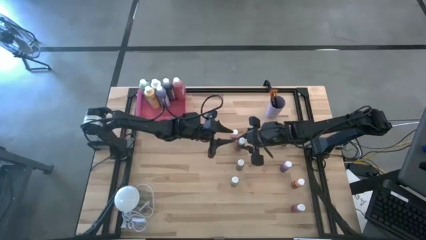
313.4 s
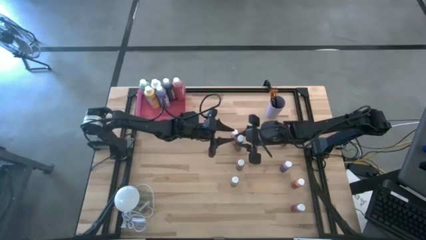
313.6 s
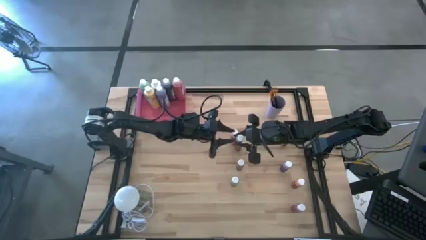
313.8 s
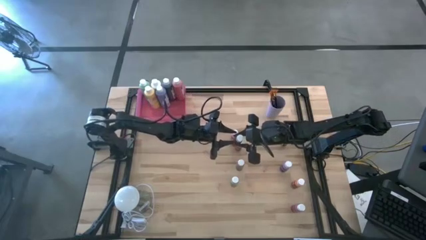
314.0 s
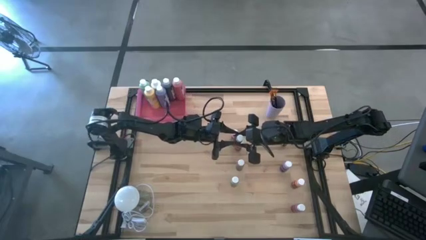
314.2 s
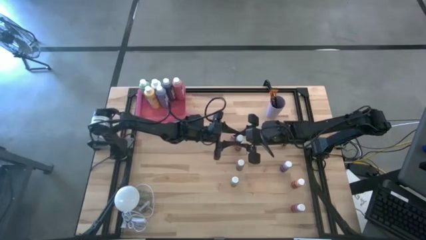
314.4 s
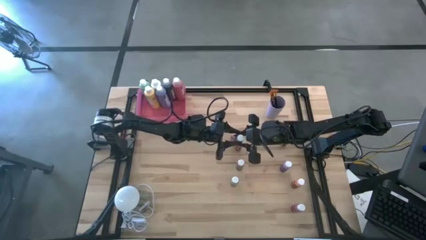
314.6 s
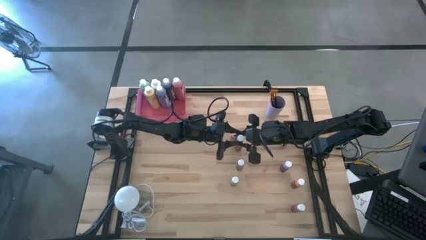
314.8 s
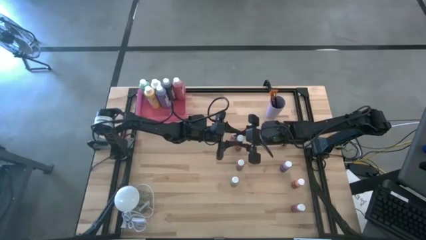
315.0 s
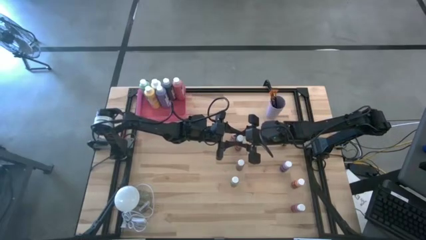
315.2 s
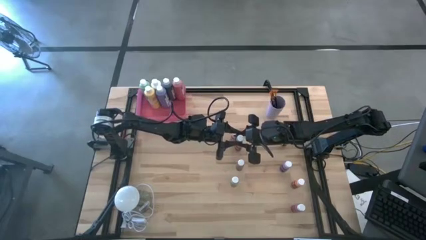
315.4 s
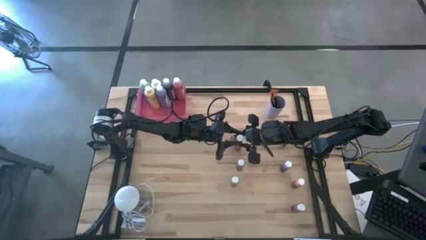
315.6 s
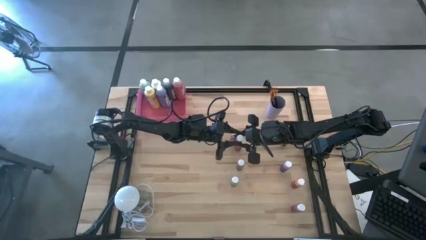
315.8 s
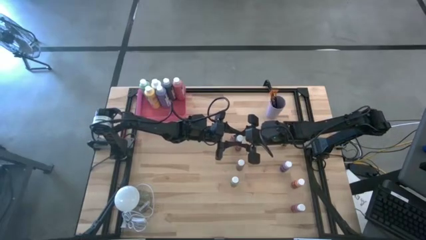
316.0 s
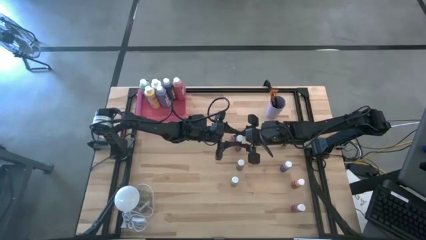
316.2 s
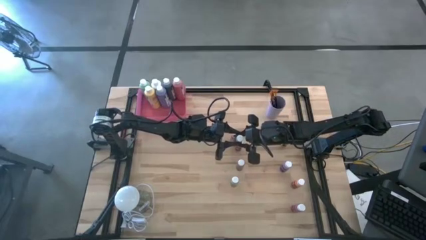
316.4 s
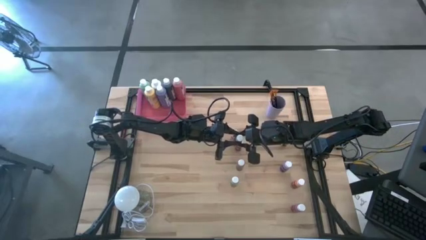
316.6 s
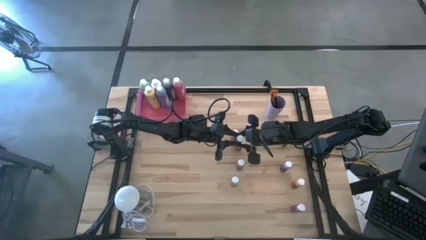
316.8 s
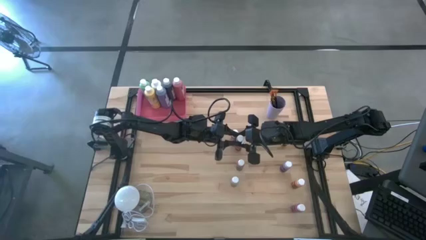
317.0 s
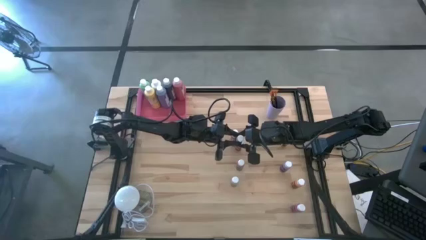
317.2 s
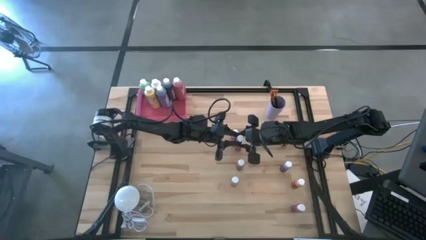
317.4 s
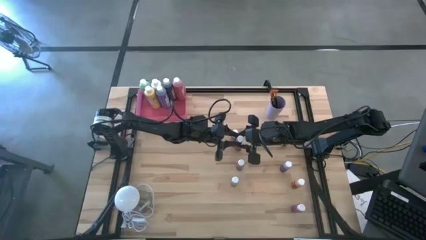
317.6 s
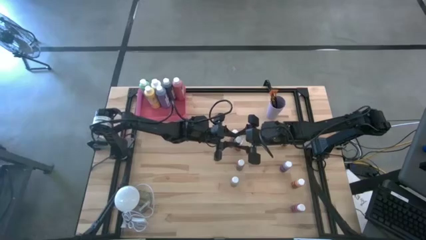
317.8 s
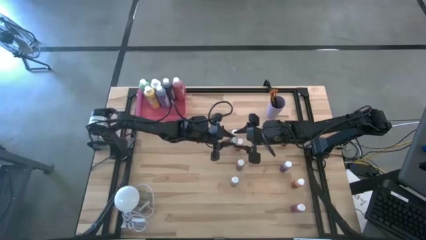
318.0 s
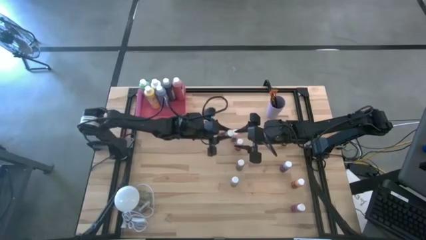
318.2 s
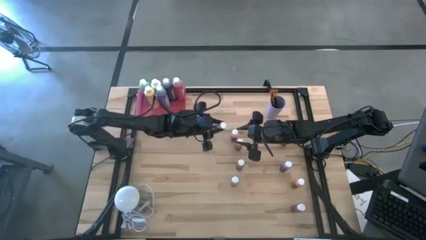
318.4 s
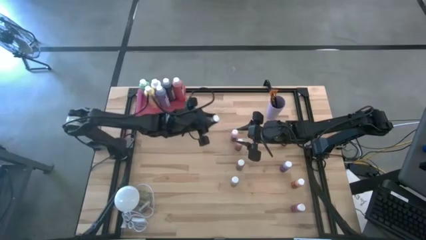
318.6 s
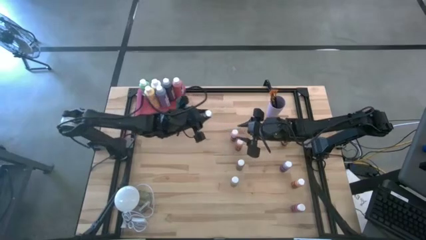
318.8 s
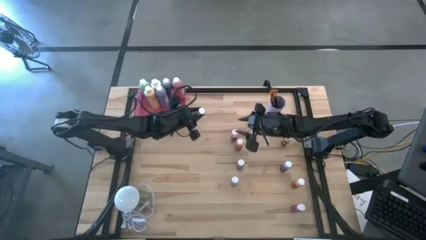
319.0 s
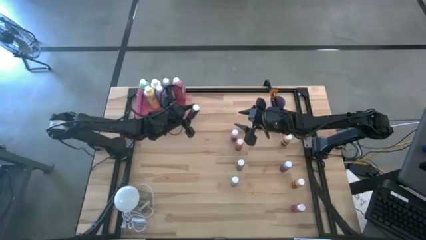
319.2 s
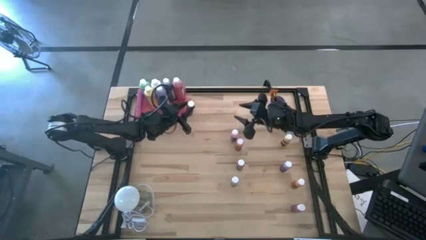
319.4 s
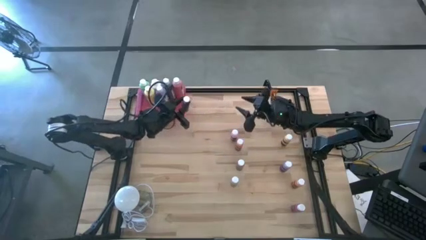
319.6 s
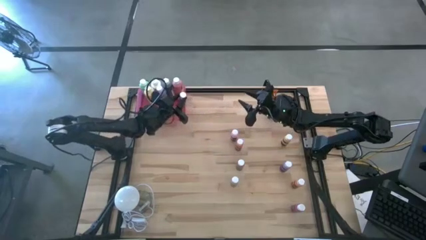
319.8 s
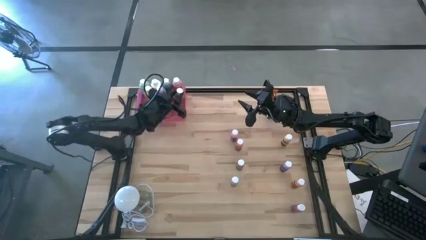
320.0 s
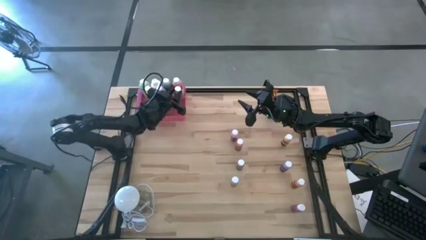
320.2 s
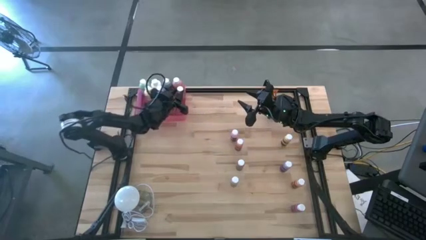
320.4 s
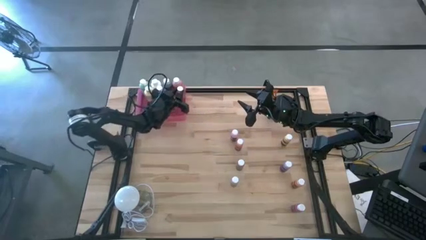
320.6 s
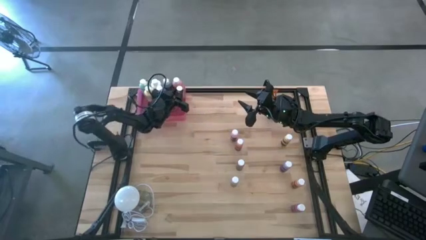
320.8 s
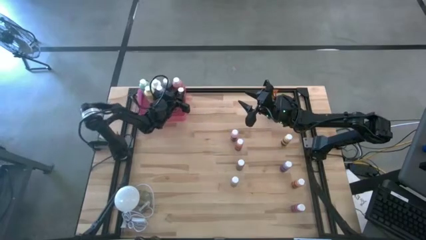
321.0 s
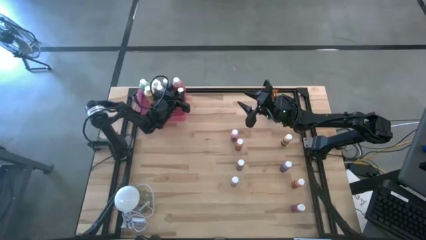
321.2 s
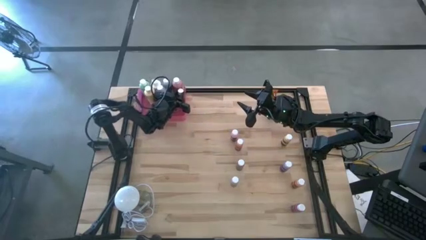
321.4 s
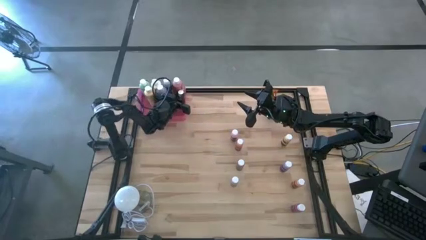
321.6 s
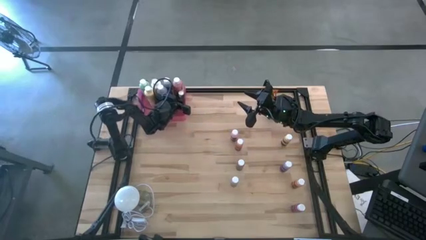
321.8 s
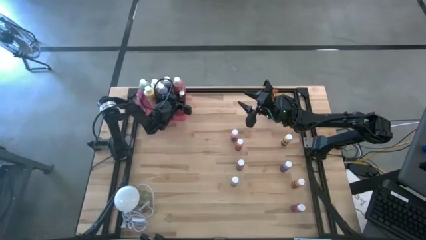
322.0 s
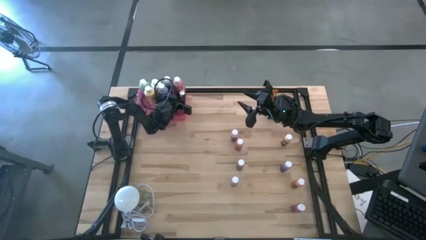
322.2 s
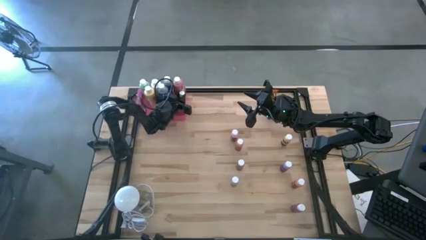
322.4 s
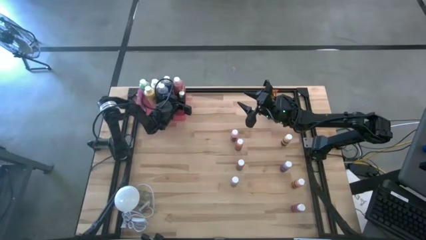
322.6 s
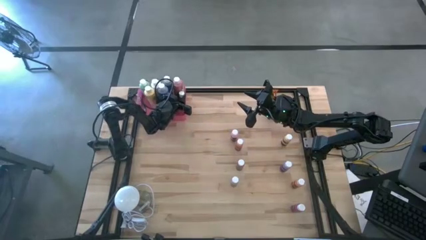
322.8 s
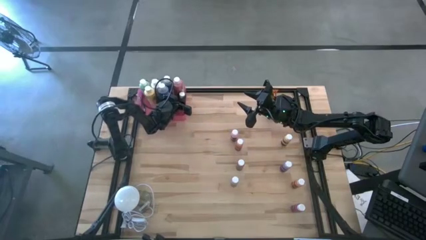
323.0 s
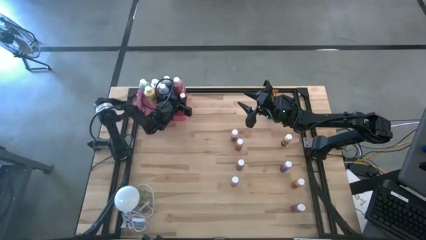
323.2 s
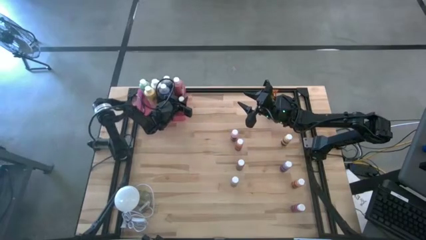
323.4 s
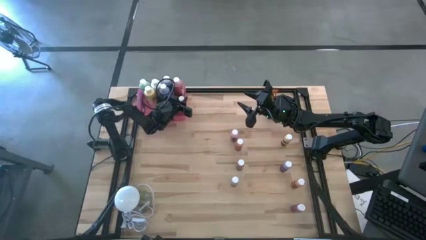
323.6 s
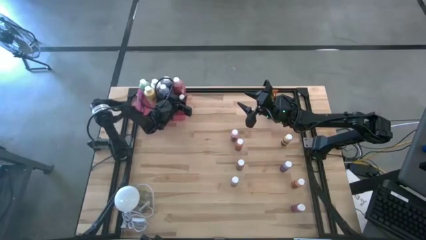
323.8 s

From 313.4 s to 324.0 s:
Task: Pick & Place Paint Supplies
Put the small brown paint bottle into the pink bin
